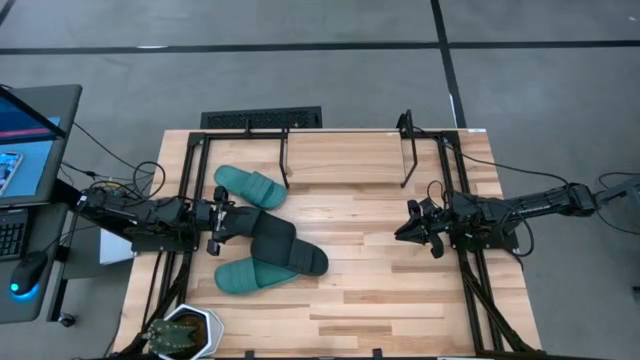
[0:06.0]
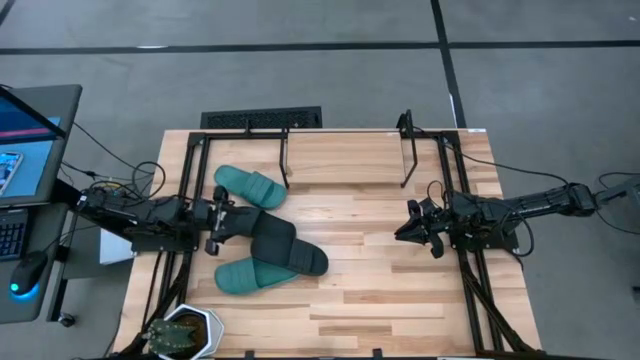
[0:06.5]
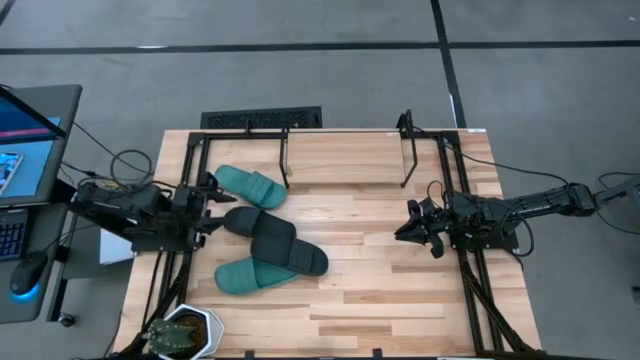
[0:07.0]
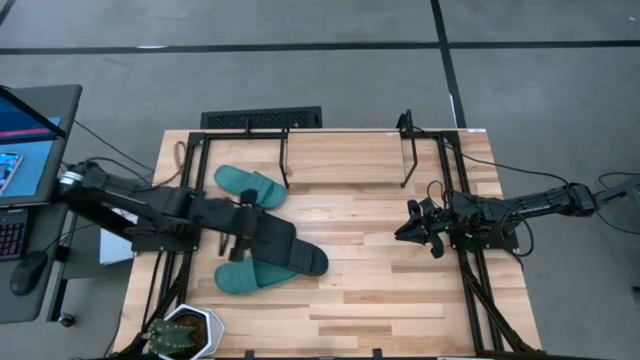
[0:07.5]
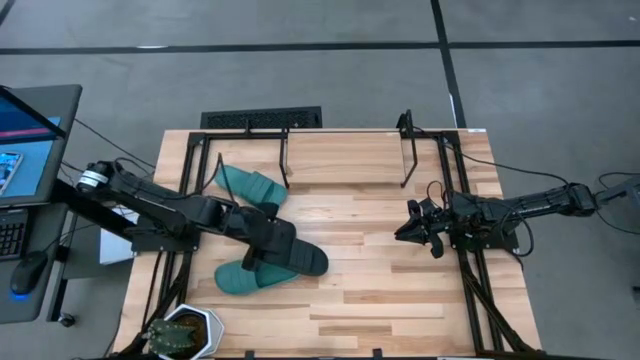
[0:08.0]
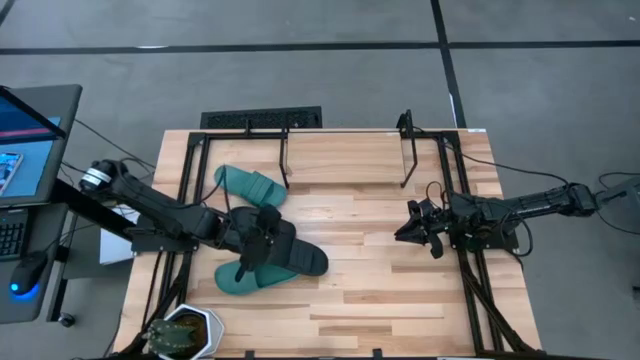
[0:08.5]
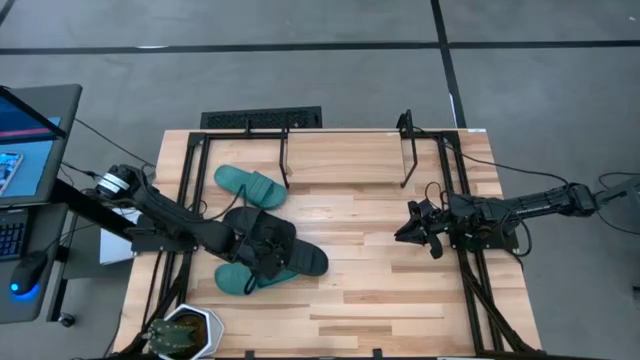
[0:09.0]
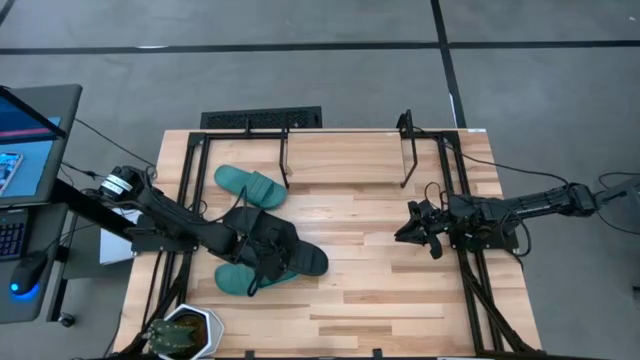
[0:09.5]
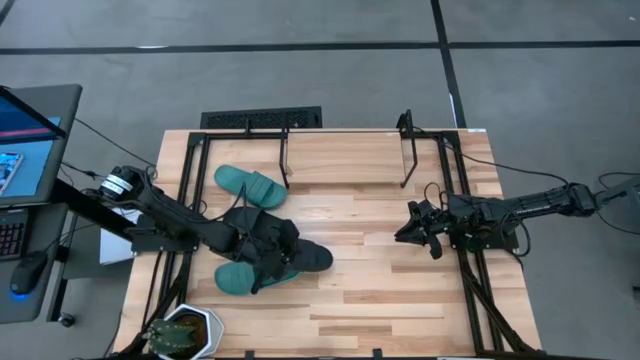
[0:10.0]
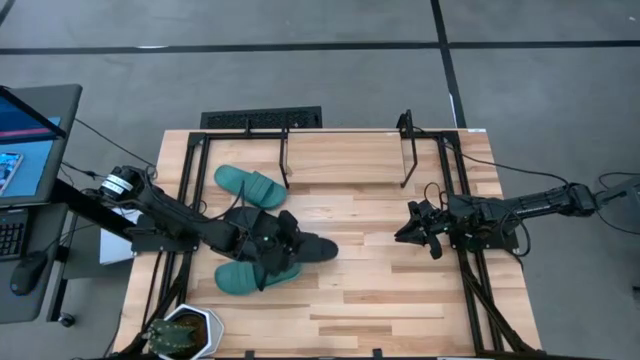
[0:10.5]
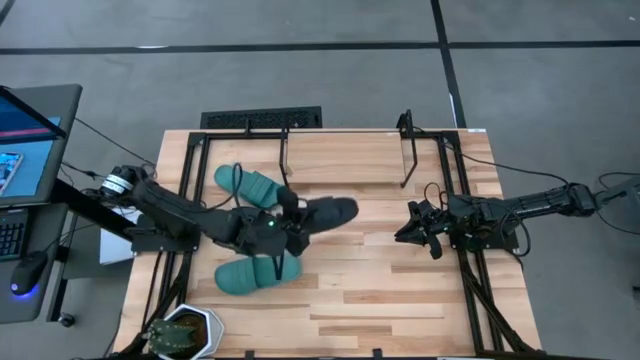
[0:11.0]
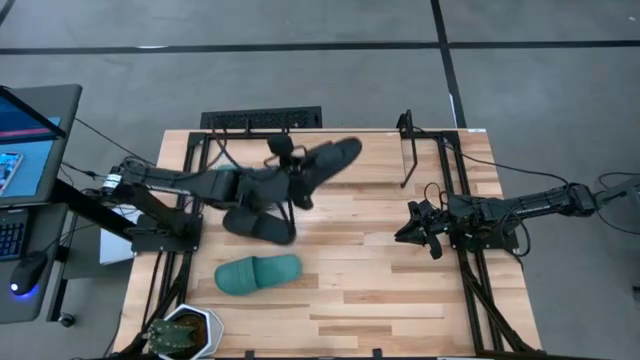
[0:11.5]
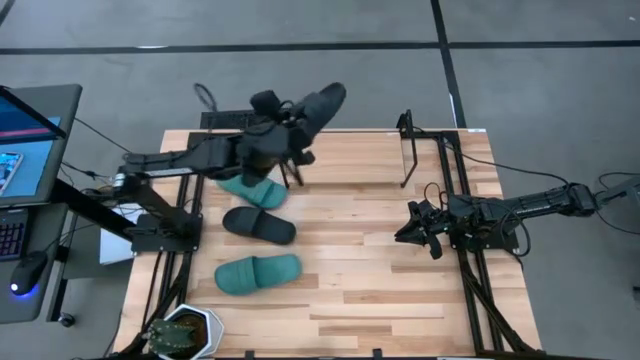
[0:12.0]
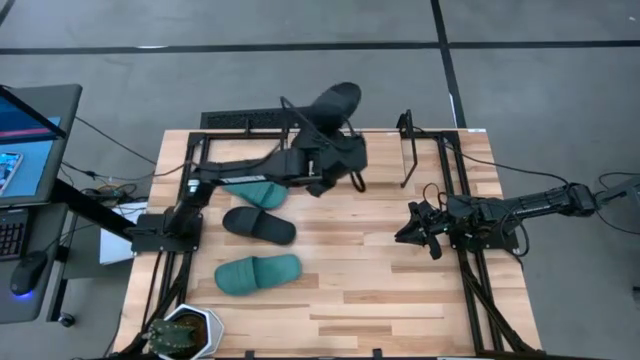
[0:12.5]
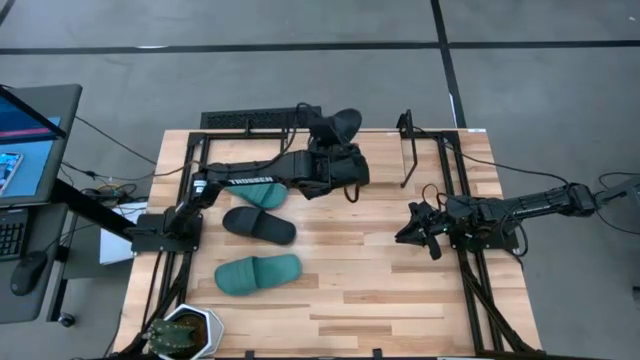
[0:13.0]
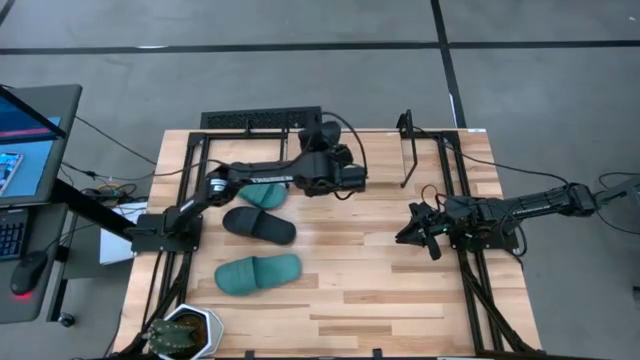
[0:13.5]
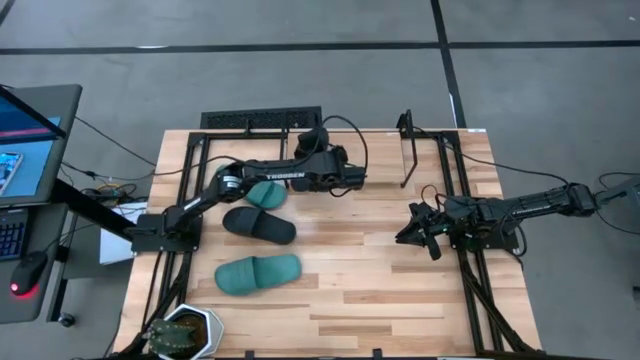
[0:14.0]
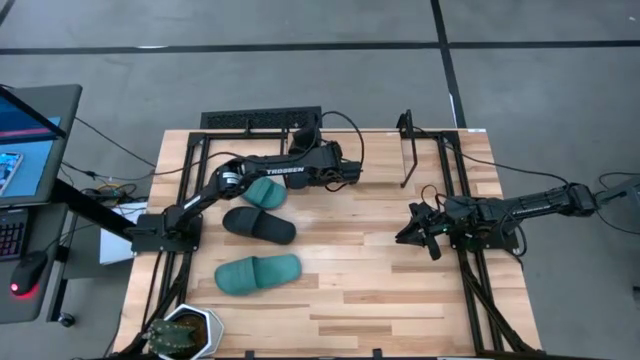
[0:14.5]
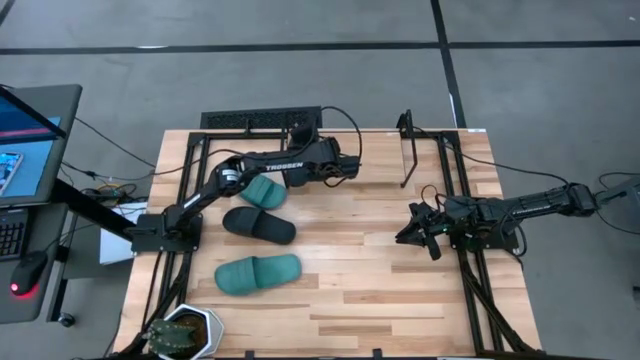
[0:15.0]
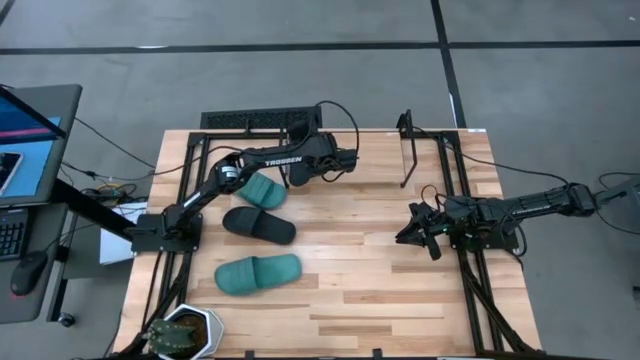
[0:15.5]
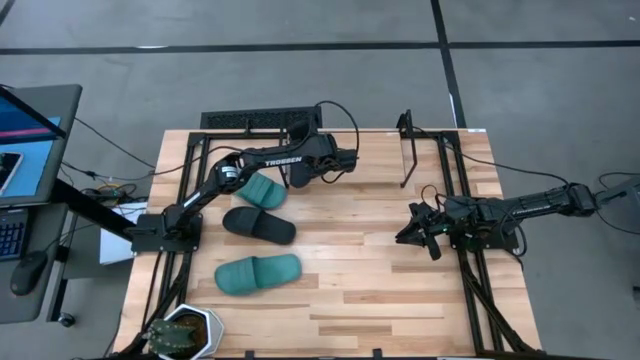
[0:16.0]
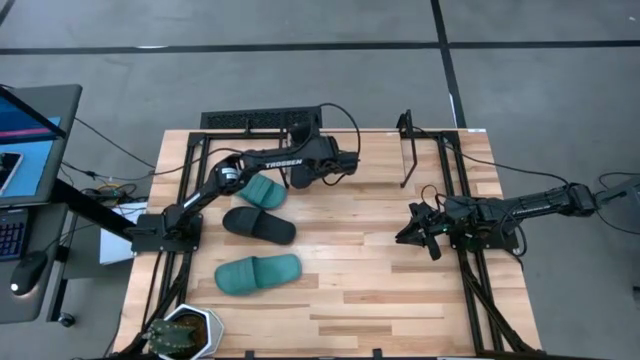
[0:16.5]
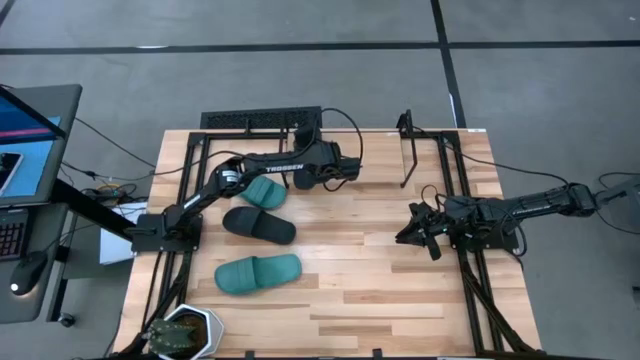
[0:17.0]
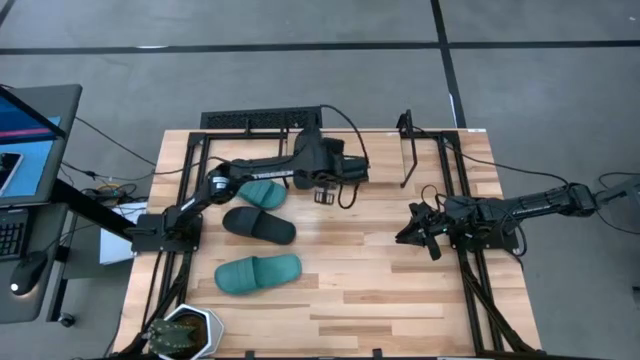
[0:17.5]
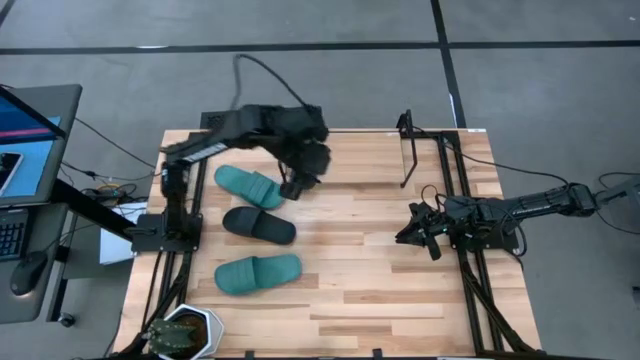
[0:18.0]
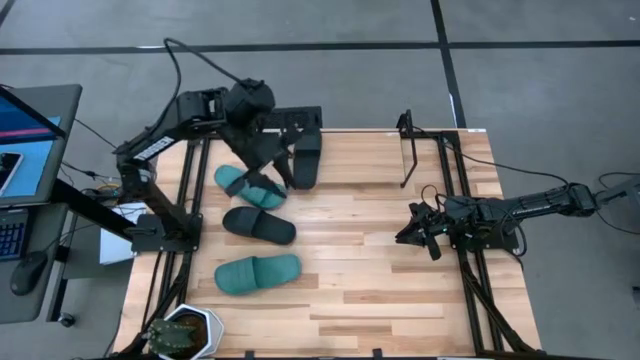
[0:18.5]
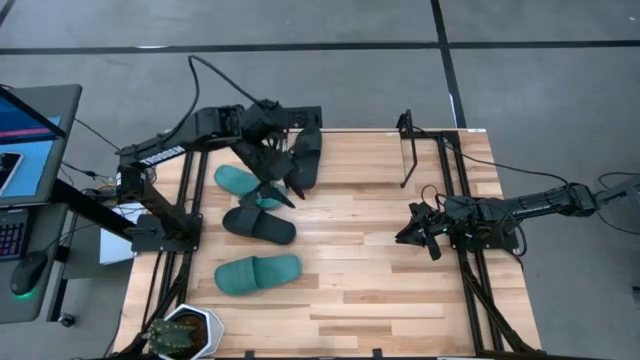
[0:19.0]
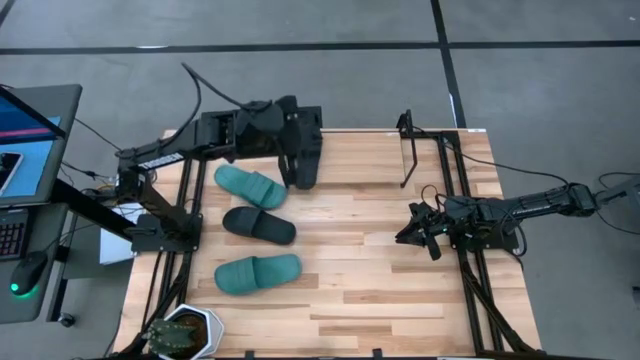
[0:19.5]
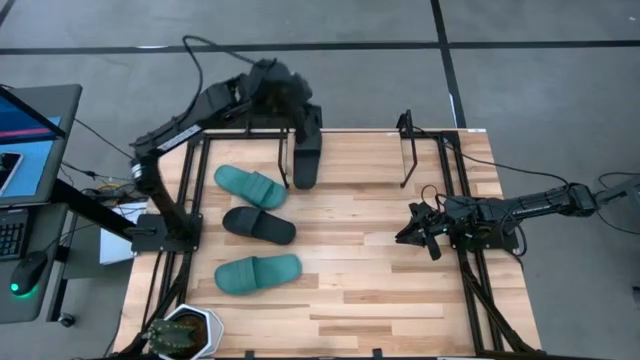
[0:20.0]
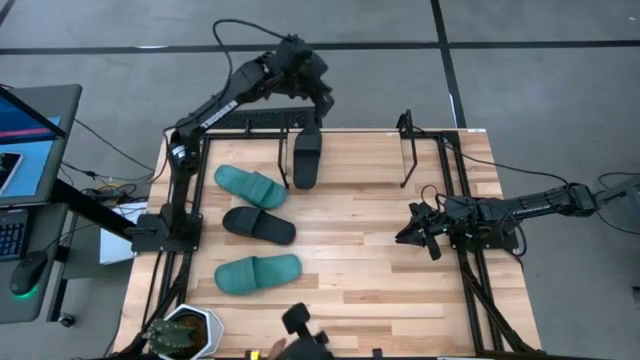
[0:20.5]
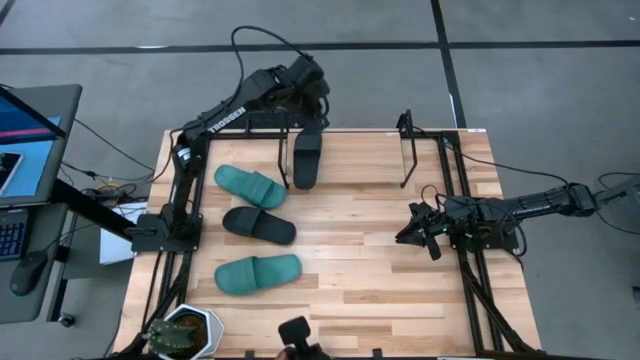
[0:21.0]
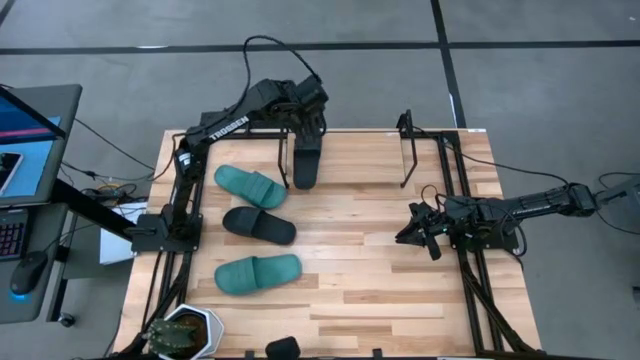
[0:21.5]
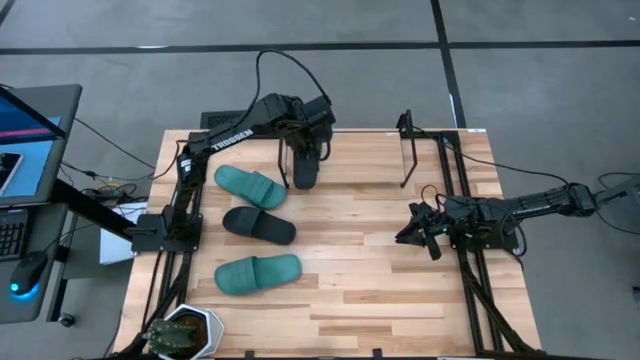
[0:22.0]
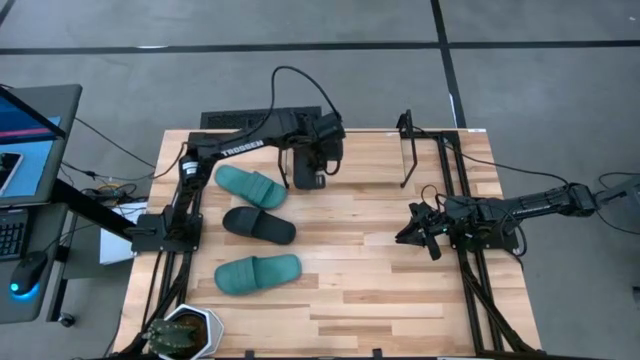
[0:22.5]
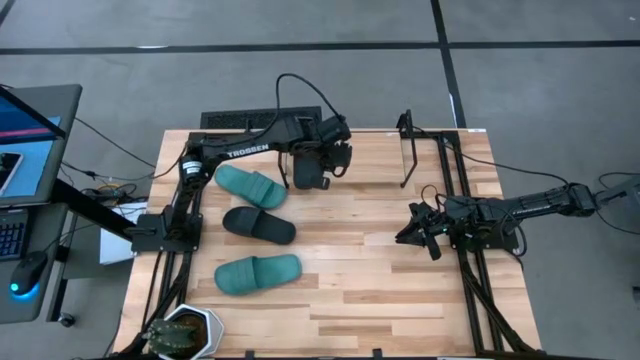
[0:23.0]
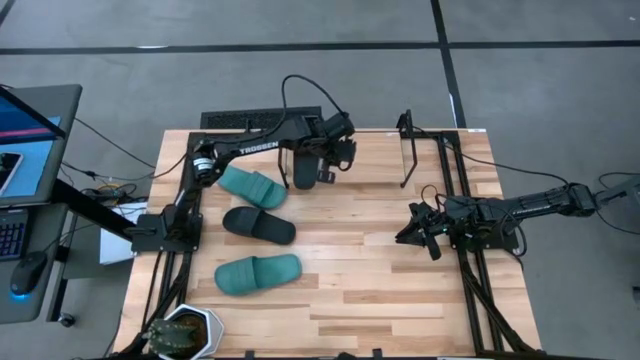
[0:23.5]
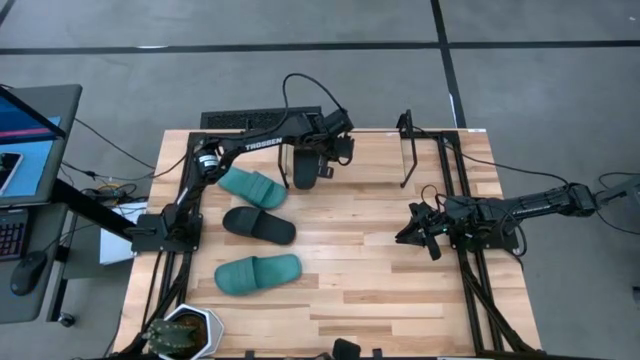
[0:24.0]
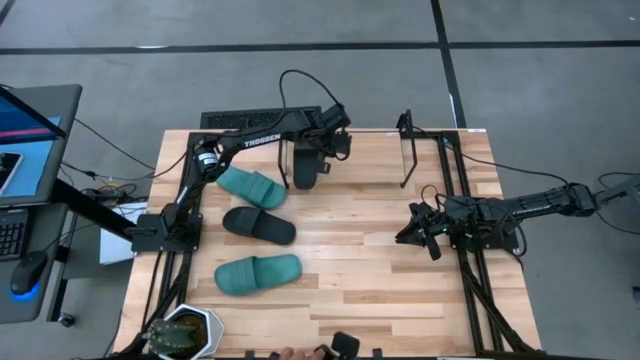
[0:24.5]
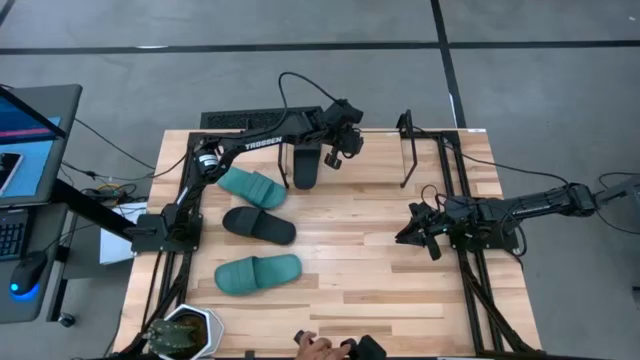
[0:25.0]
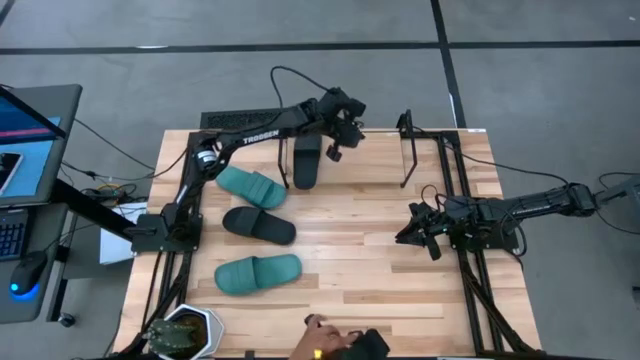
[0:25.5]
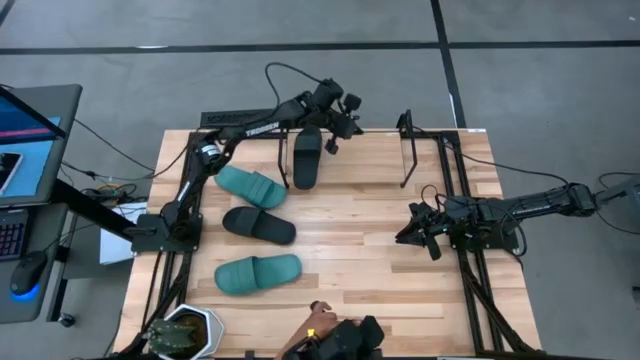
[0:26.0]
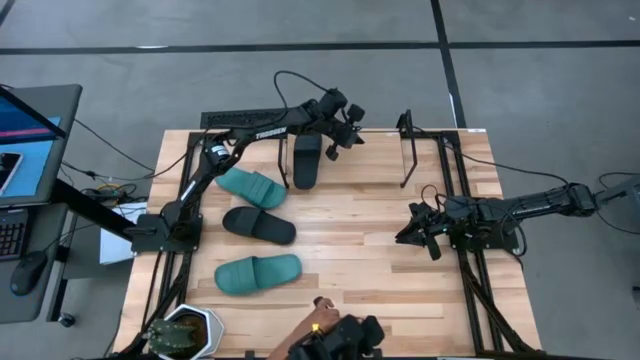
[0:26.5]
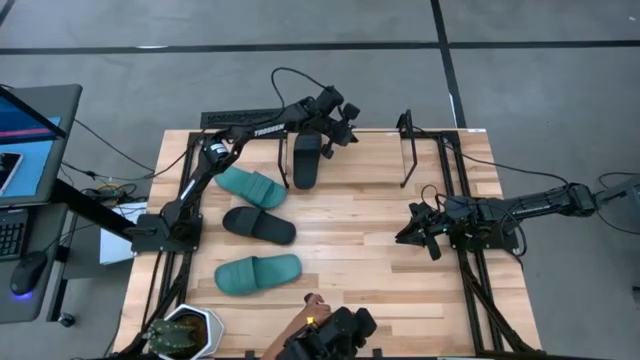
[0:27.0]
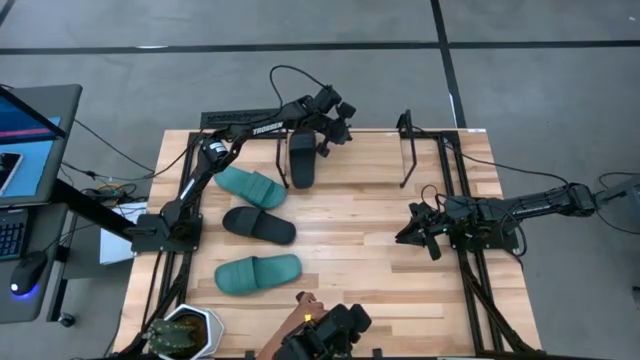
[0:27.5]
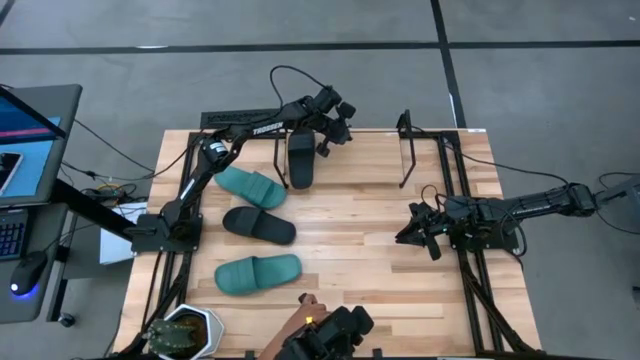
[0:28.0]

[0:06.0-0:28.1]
Task: Pick and place slides into the shelf
Put the right black slipper on the shelf
